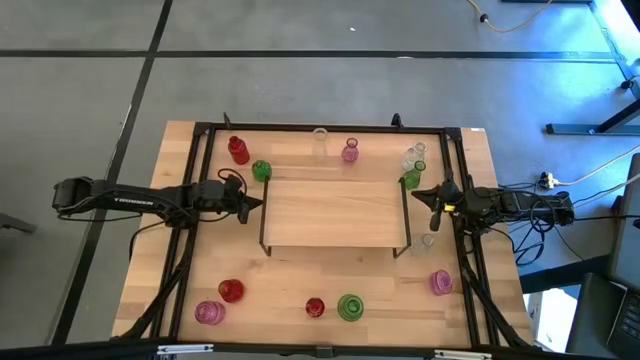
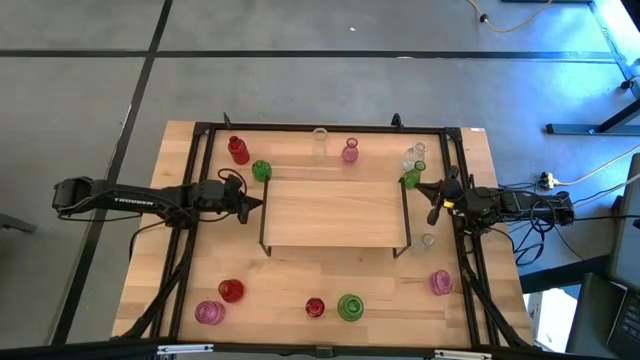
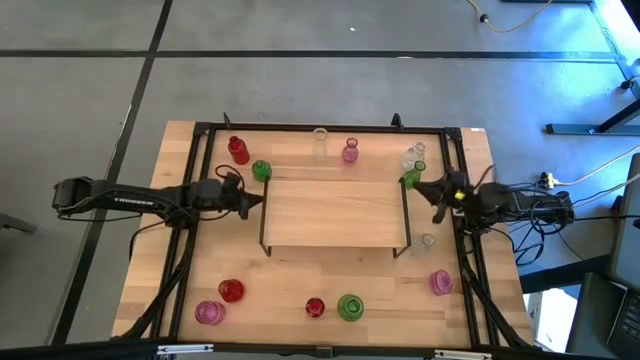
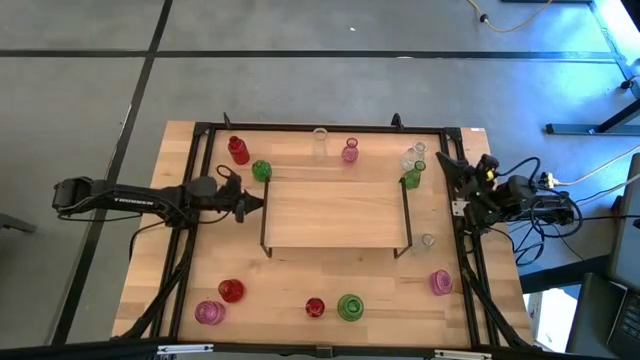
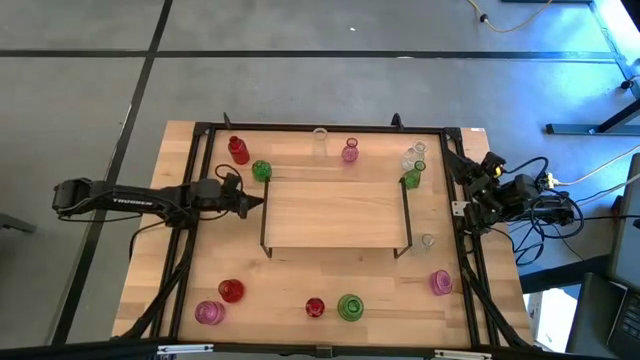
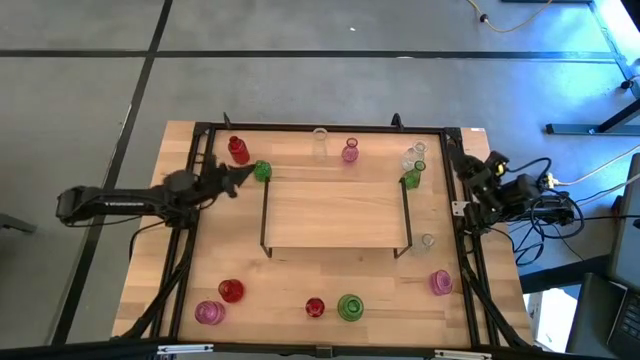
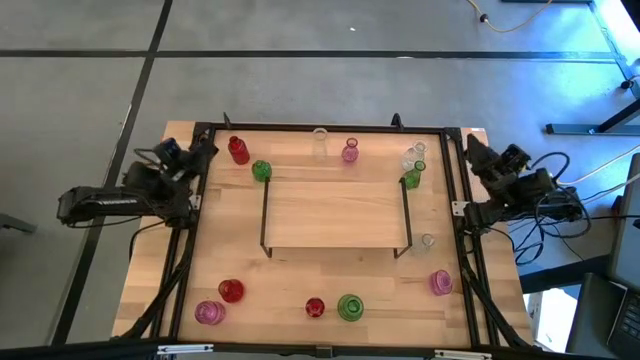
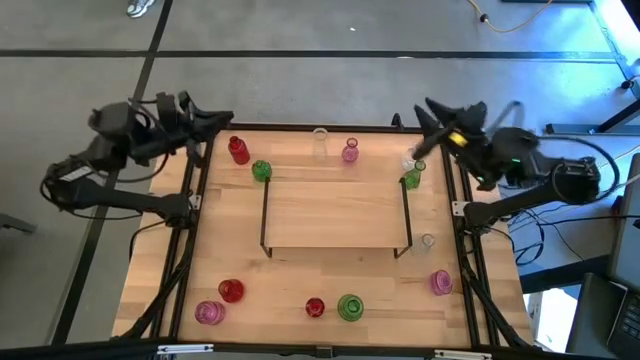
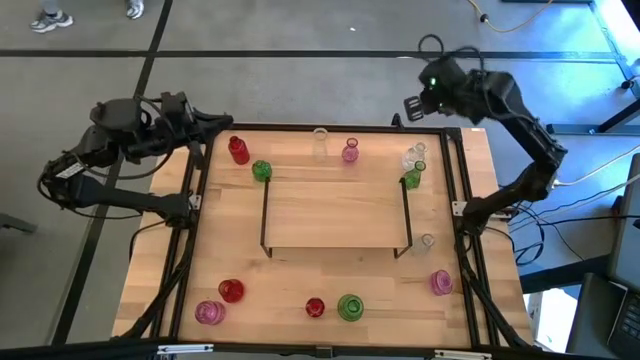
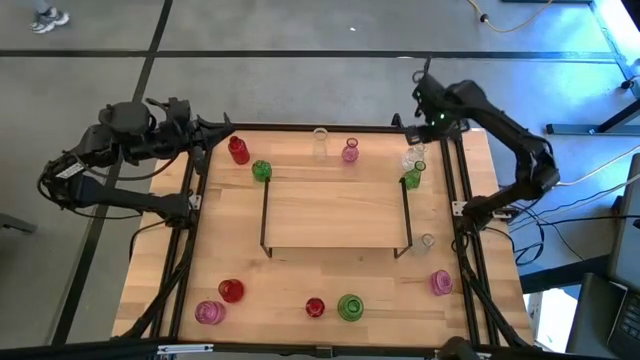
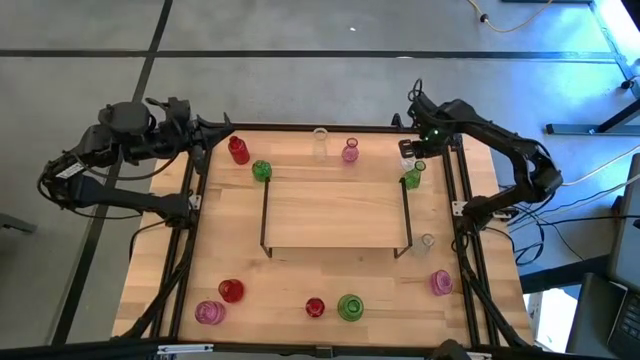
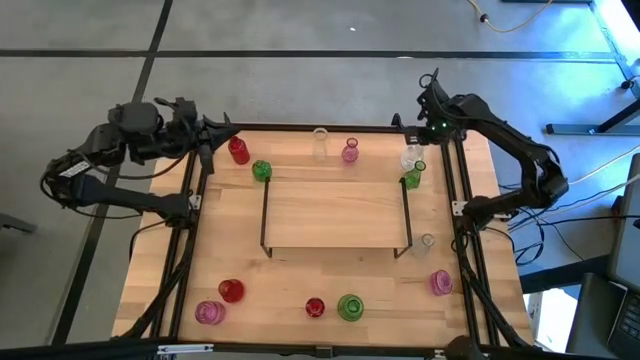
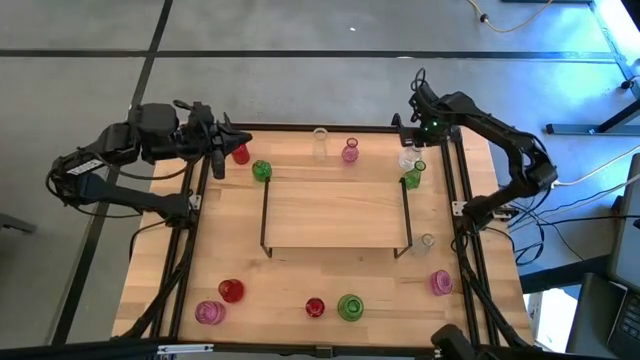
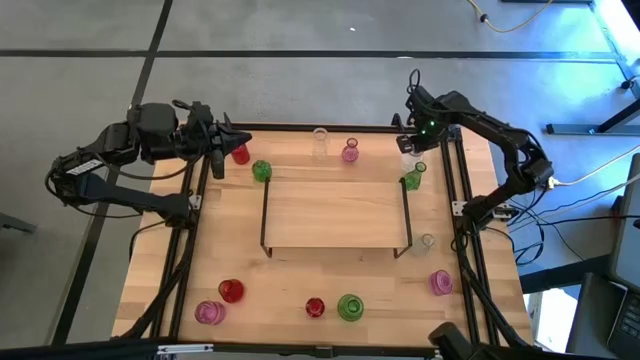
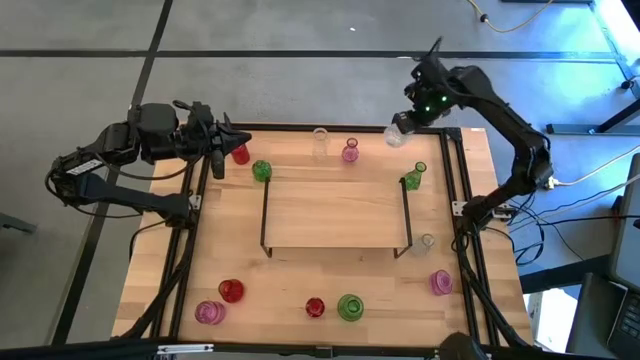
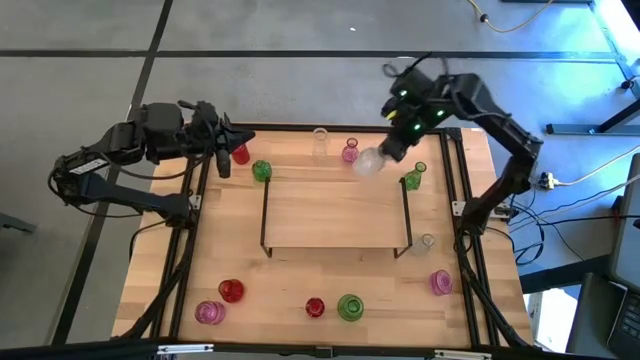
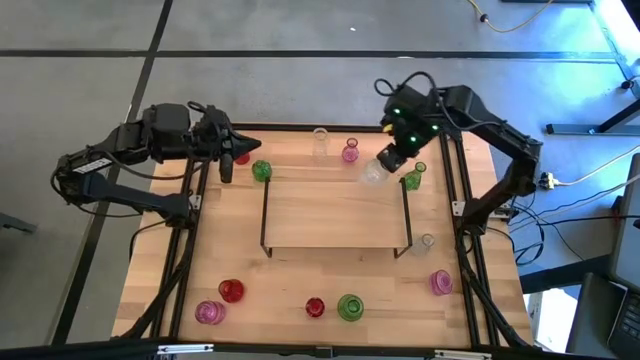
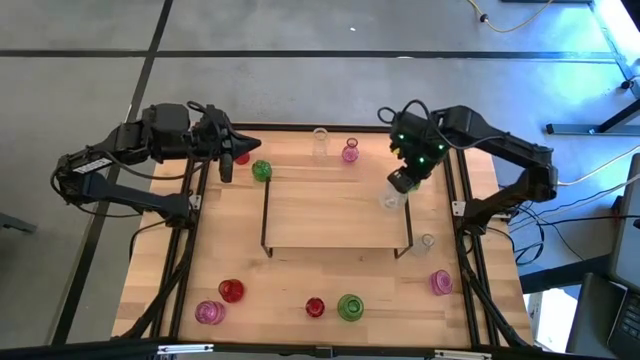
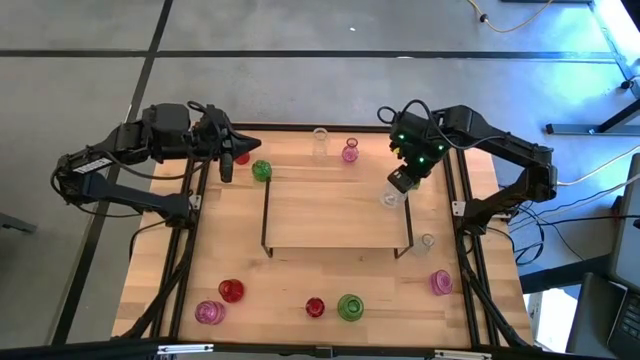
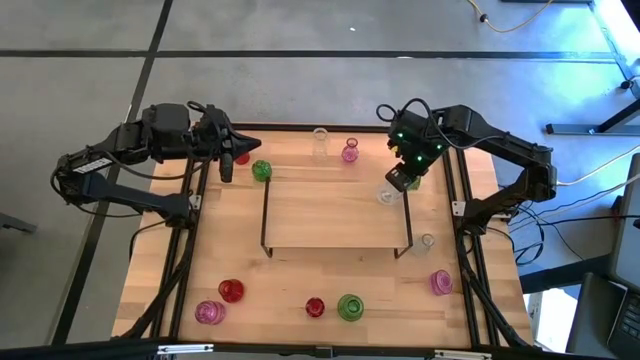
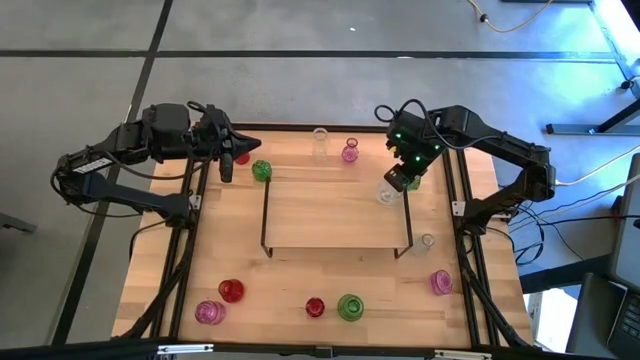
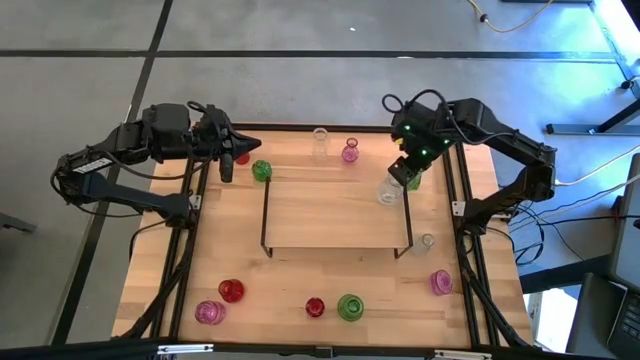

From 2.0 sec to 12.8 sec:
Task: sort vases onto shelf
Put the top right transparent vase on the shelf

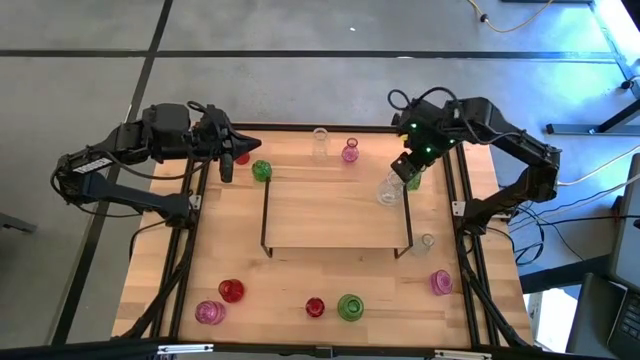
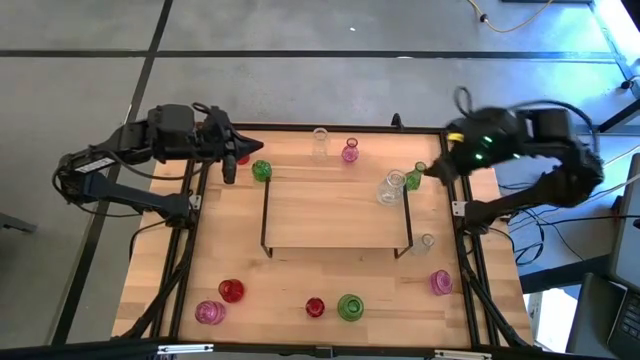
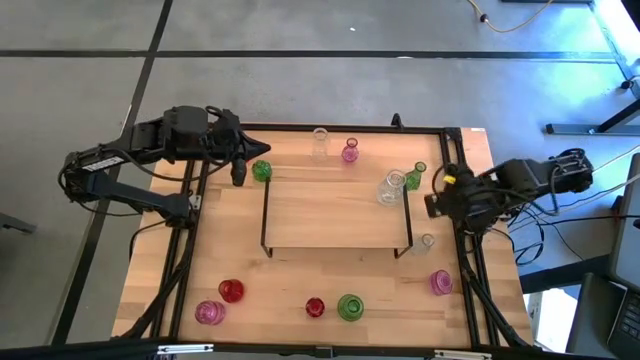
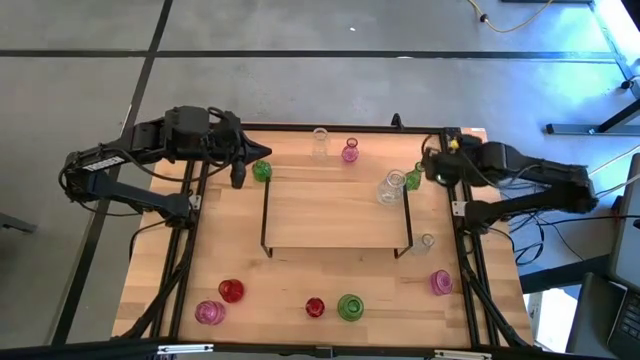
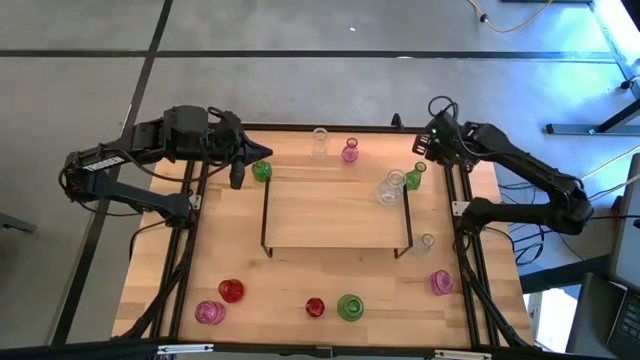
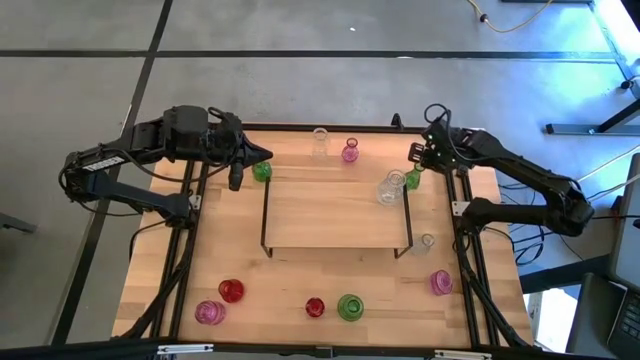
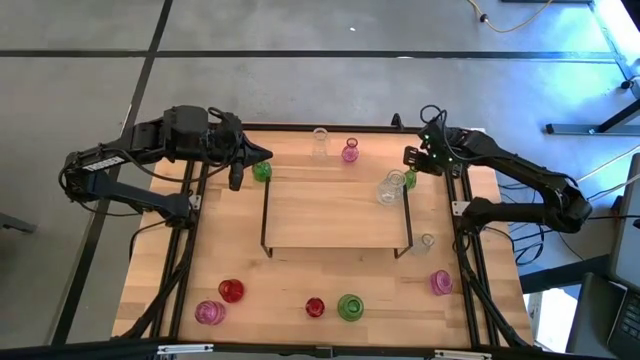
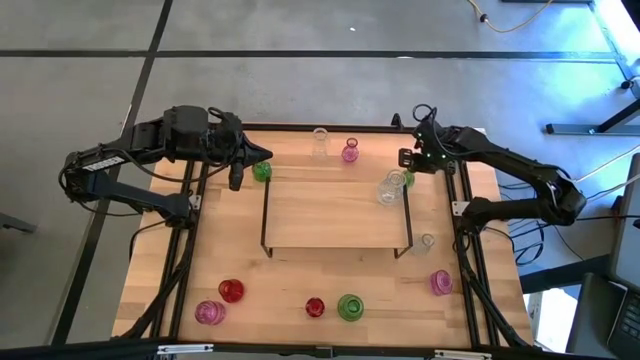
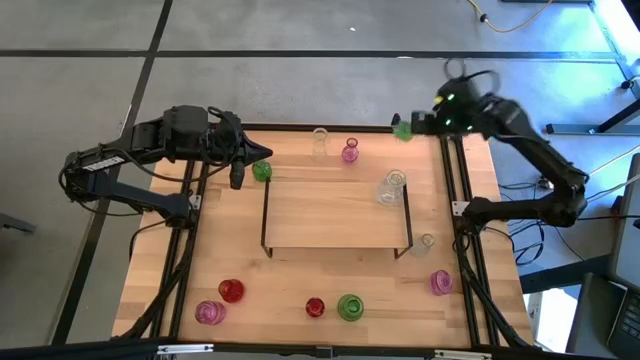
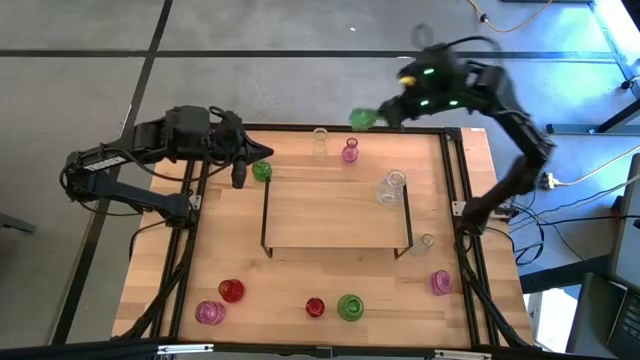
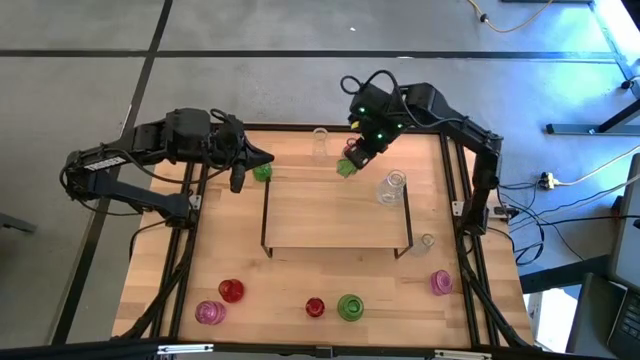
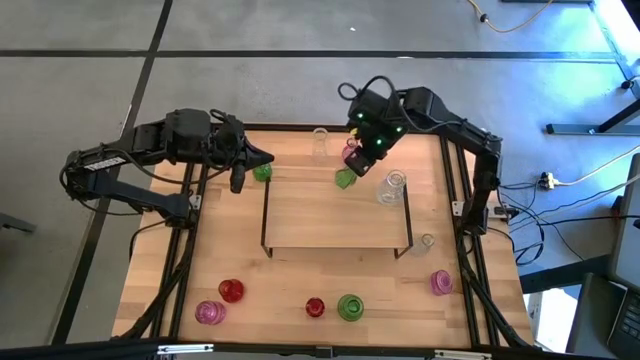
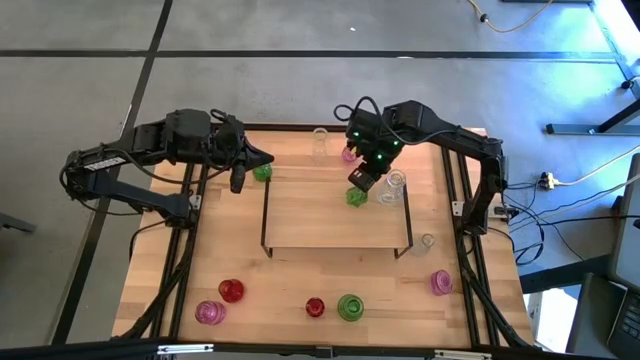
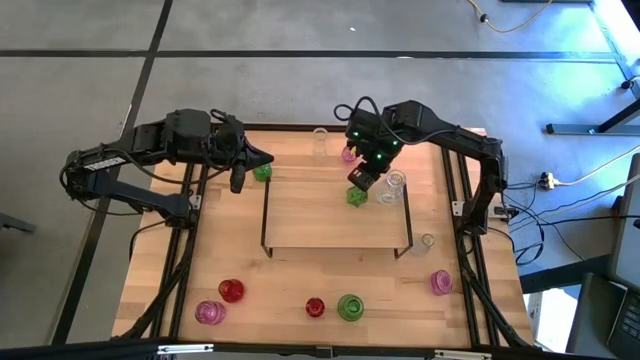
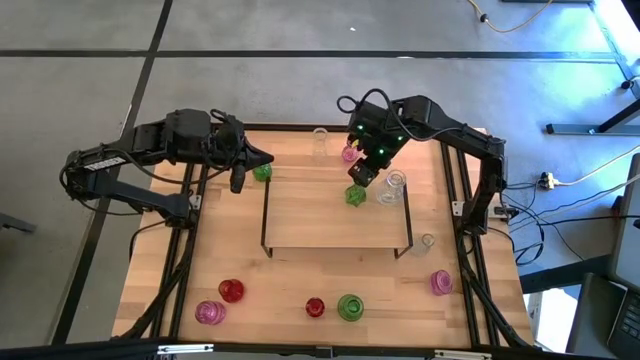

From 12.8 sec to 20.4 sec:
Put the top right green vase on the shelf

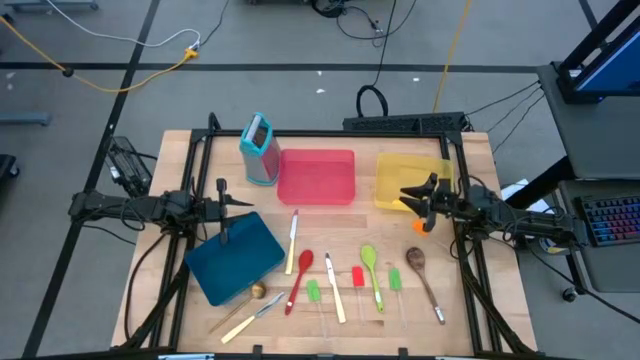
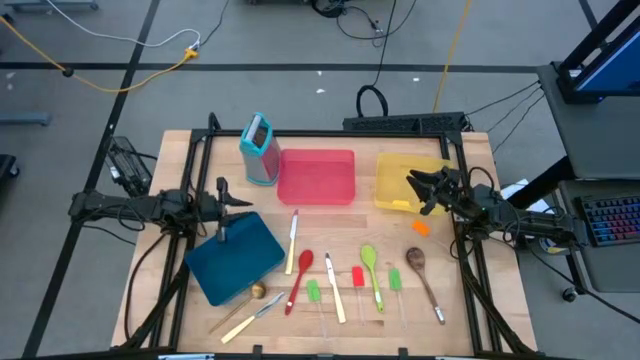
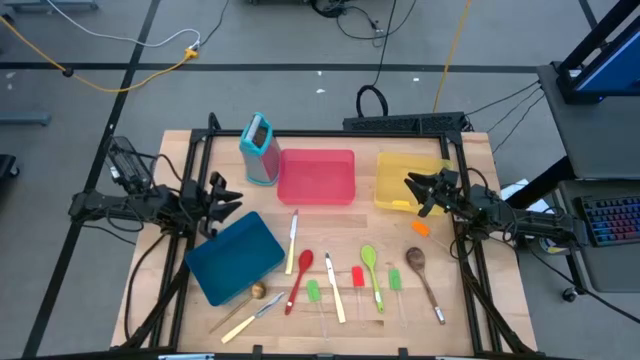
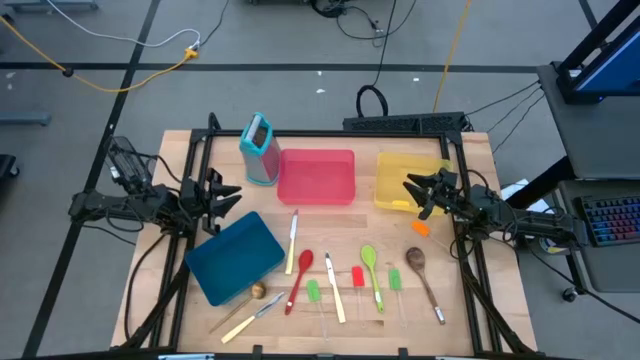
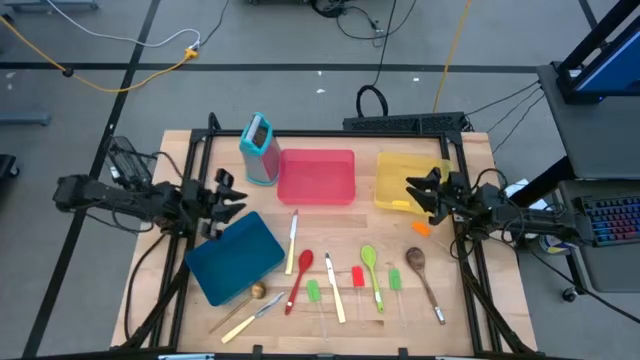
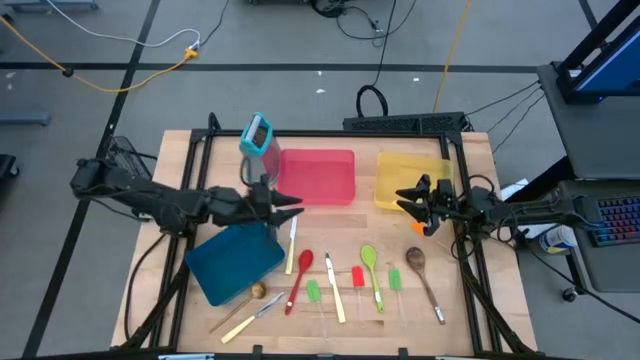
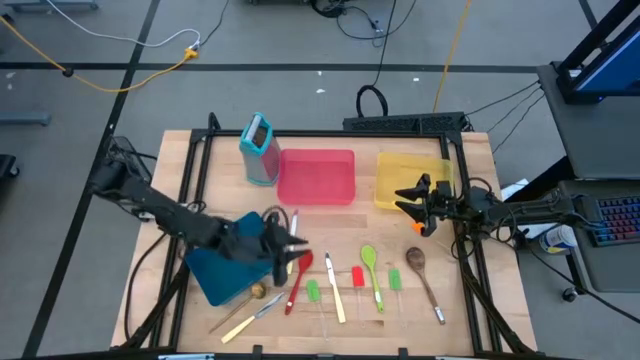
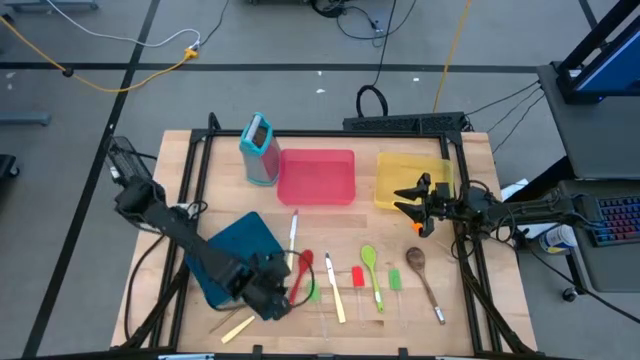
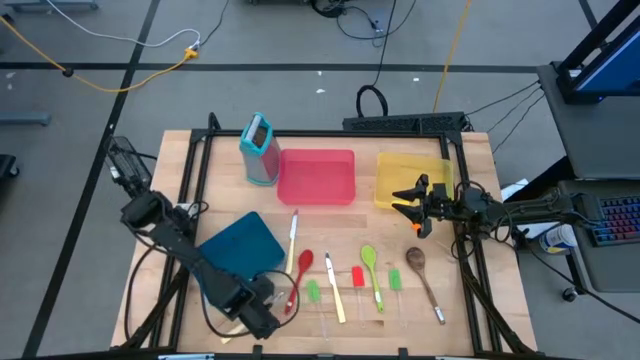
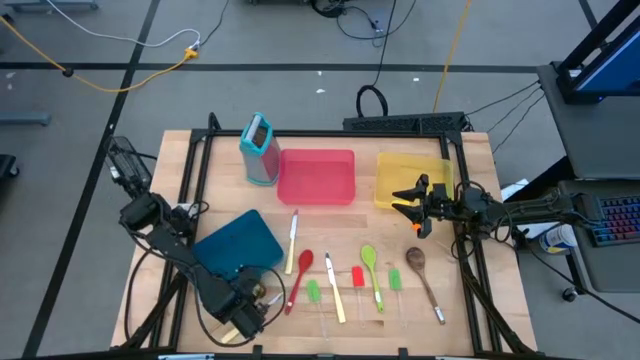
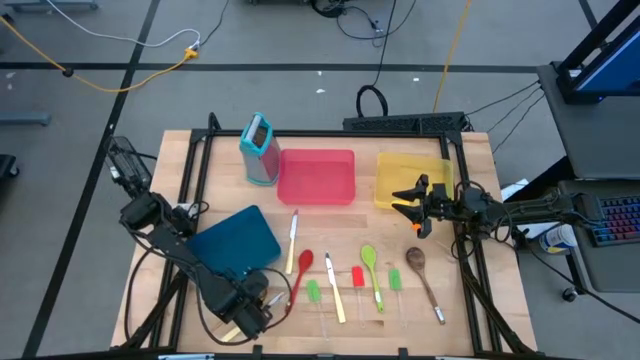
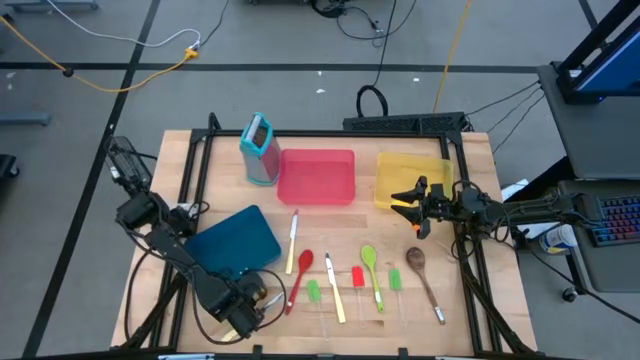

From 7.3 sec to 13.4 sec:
Task: Pick & Place Kitchen Items
Put the gold spoon into the blue bin
